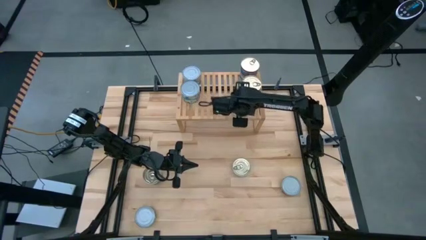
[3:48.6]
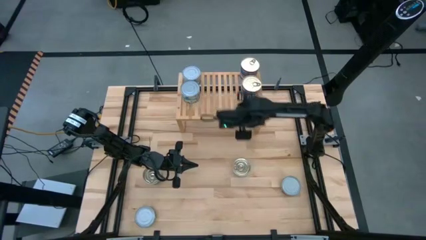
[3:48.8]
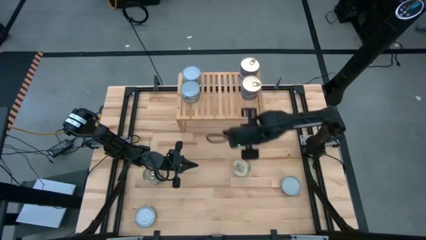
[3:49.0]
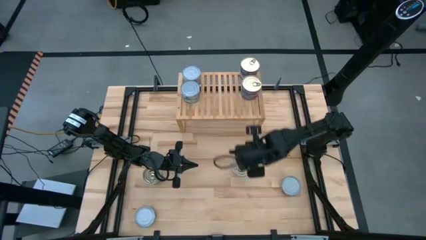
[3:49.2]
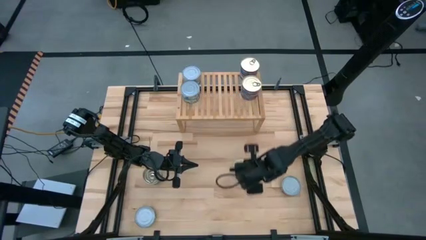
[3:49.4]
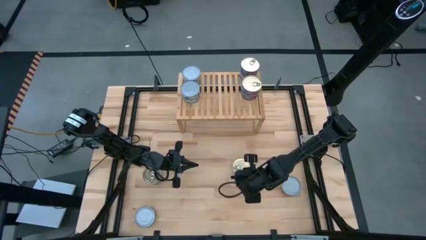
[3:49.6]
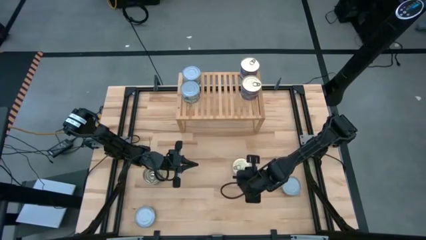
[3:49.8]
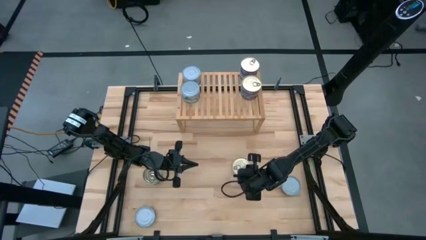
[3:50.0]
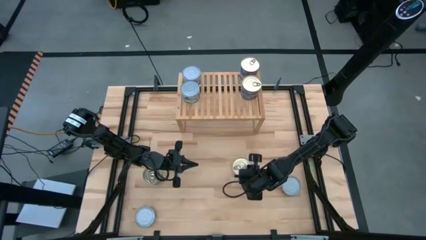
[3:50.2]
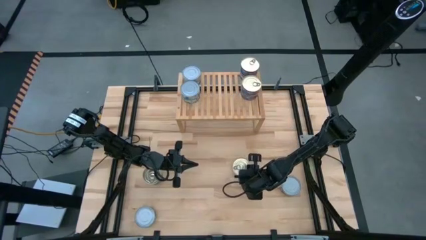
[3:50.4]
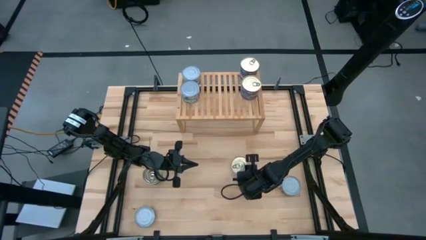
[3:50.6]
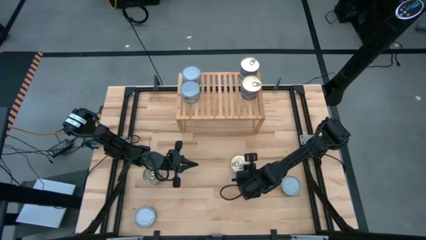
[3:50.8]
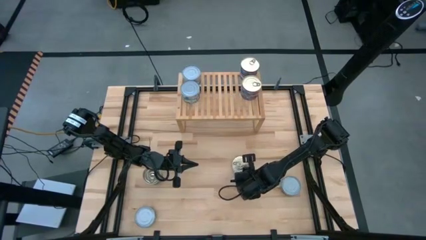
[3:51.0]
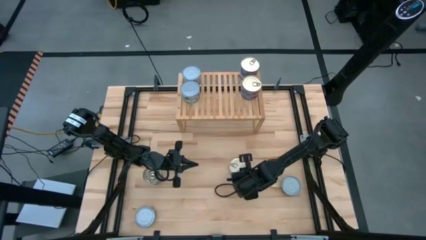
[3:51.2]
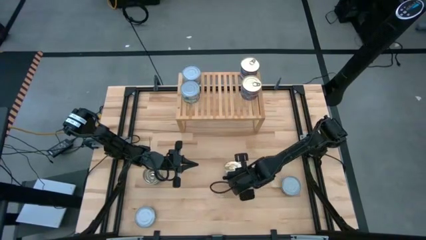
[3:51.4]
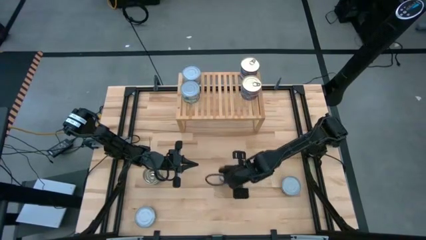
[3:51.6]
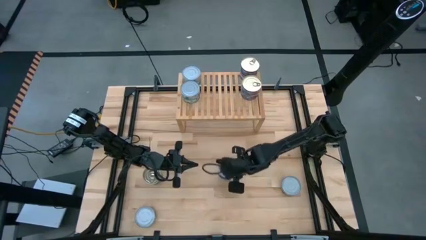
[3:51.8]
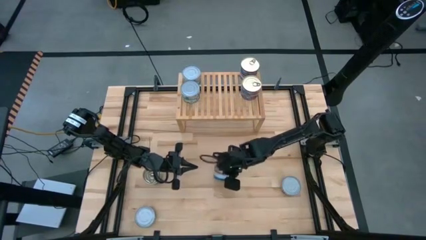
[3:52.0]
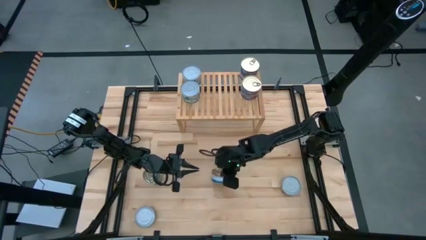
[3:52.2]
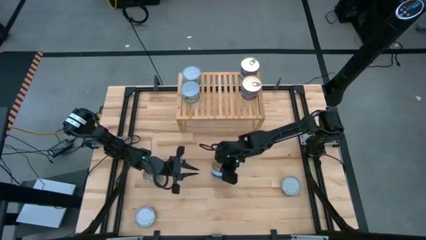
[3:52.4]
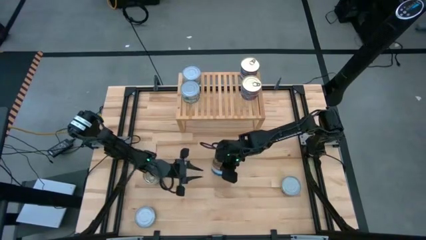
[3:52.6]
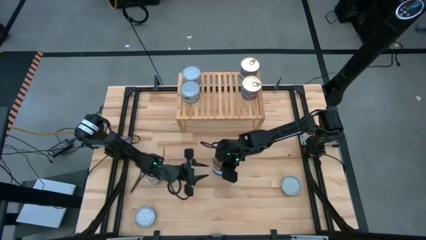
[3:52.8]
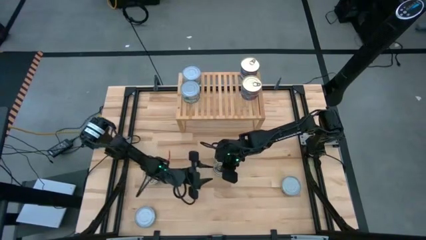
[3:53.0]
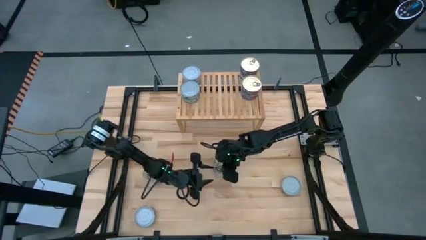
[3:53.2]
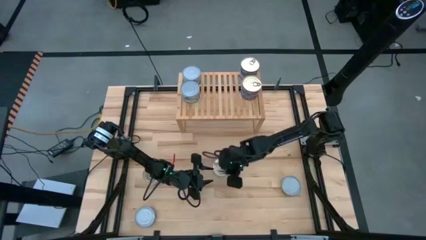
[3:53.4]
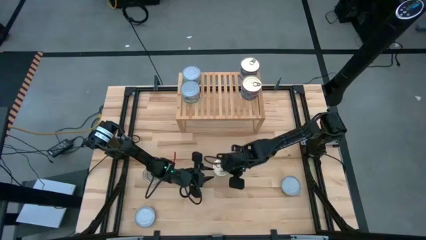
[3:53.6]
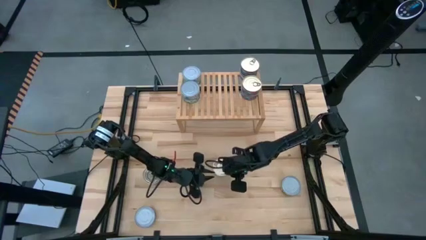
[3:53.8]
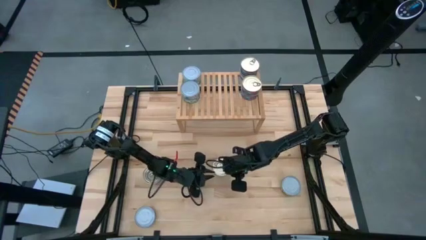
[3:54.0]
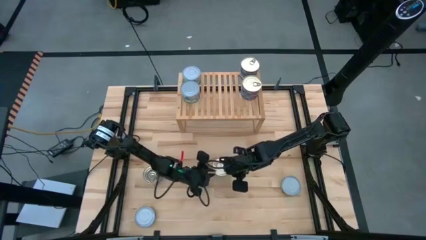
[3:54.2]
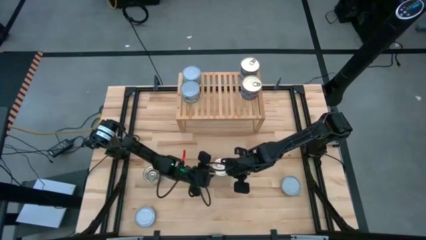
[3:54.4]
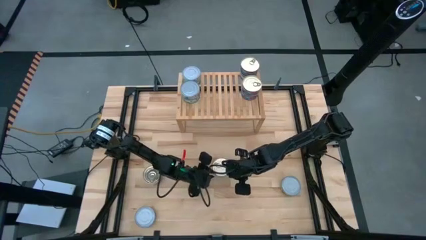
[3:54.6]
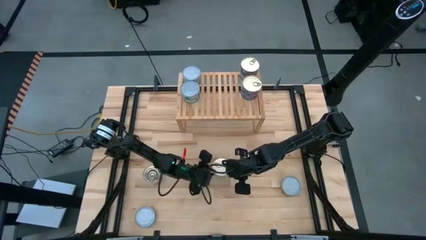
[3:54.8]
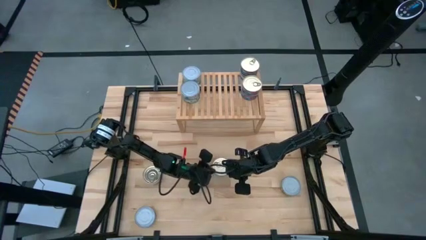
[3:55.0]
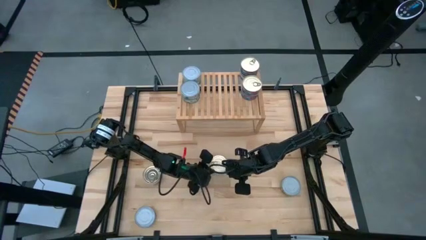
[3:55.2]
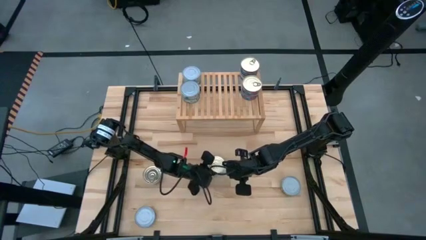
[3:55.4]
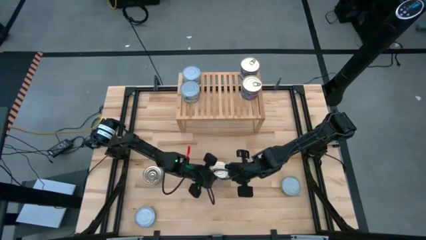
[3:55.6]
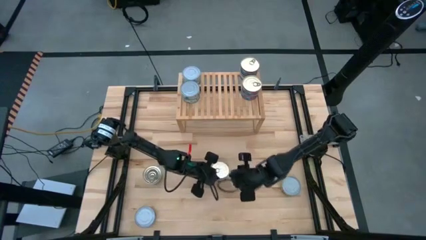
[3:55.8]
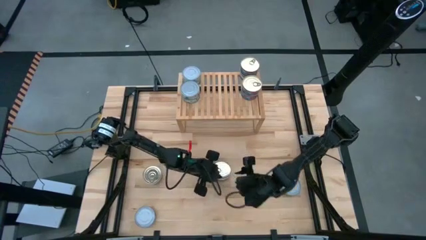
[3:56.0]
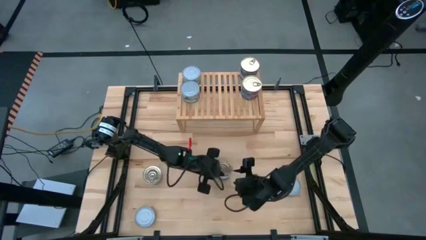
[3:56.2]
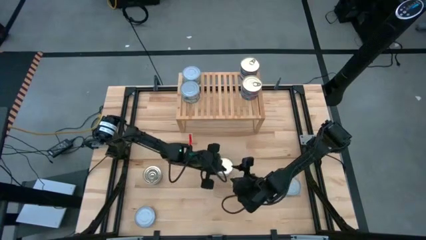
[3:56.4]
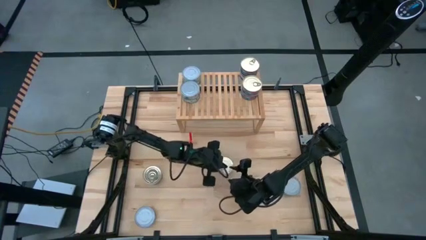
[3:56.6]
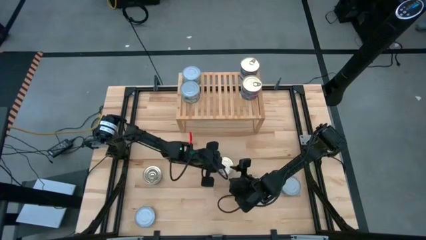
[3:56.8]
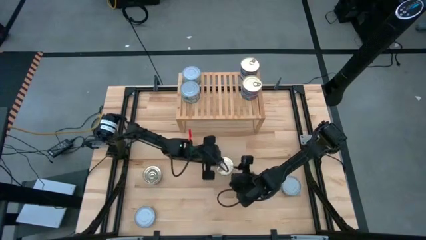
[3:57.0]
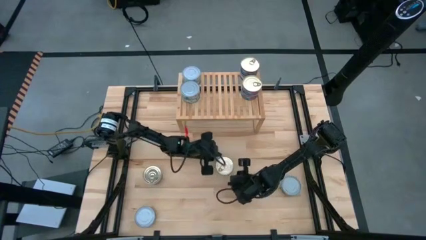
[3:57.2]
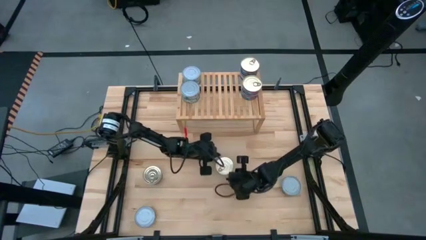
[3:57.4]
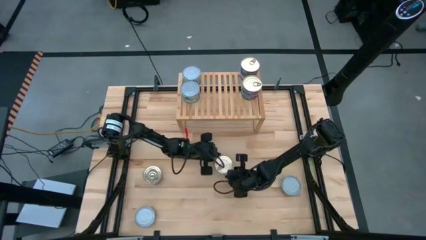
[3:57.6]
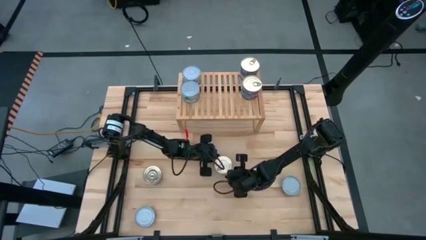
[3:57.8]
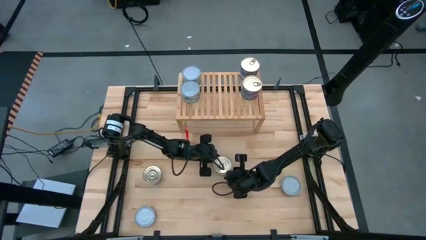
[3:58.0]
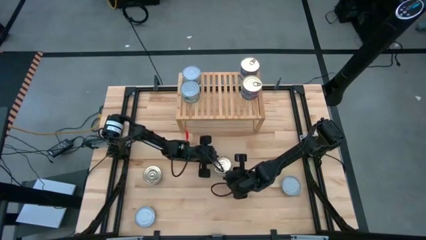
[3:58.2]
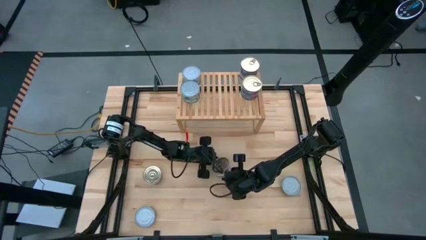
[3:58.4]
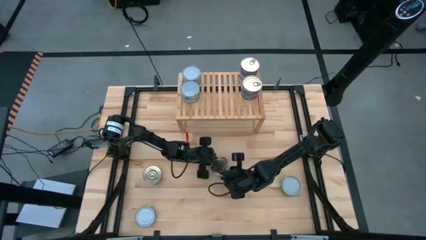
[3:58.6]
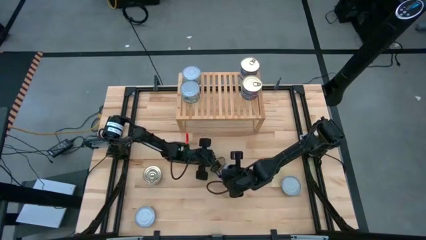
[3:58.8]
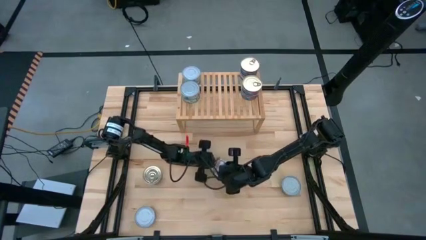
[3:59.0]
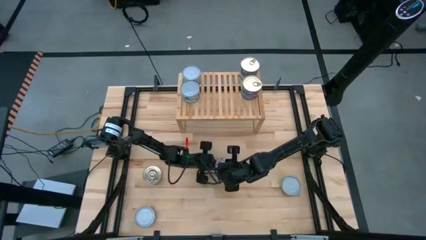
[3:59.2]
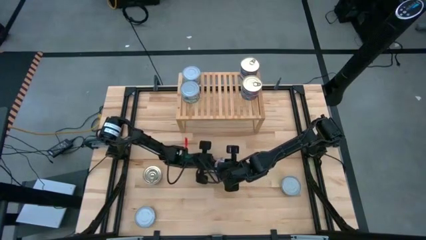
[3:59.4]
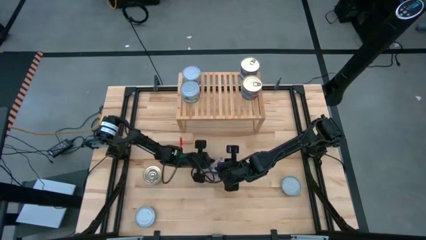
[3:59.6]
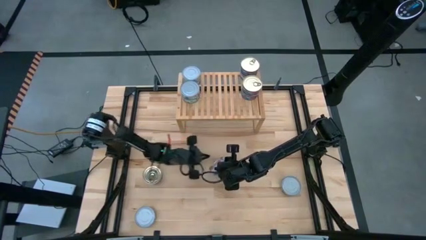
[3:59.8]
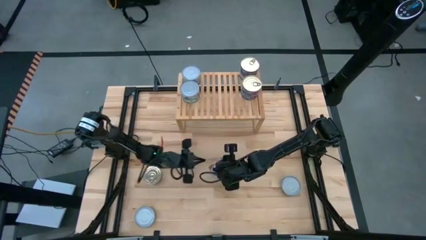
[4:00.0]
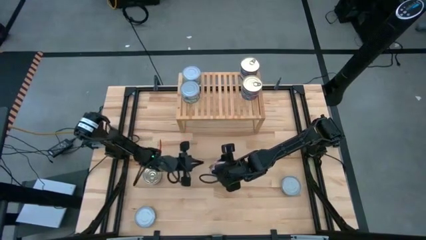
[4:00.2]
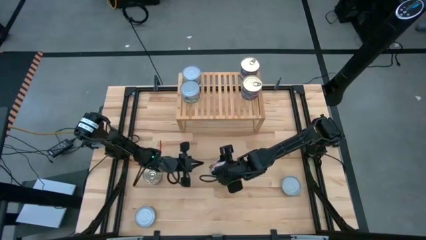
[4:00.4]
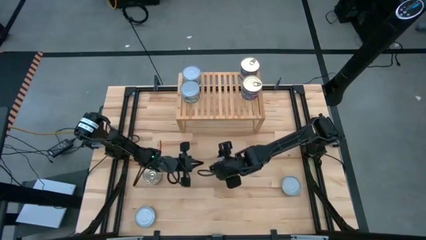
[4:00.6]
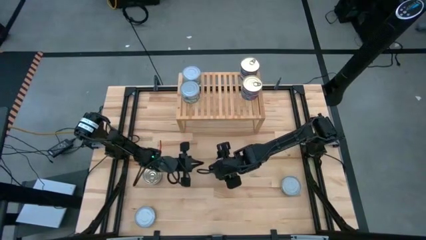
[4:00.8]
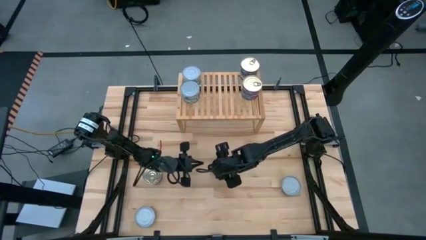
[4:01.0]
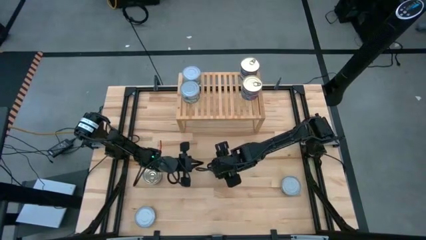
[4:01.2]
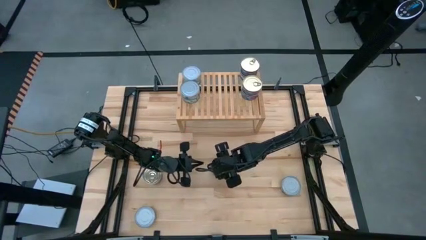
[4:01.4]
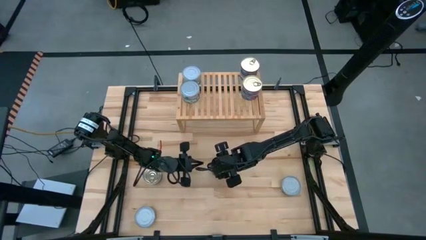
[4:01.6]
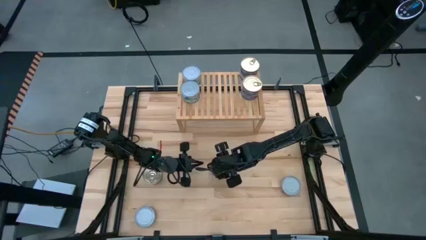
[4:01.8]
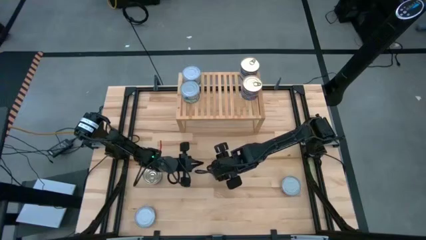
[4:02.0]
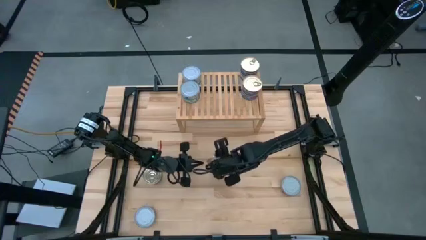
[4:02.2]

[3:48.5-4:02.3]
Task: Stack canned seafood by type on shelf
Put the blue tuna can on the shelf

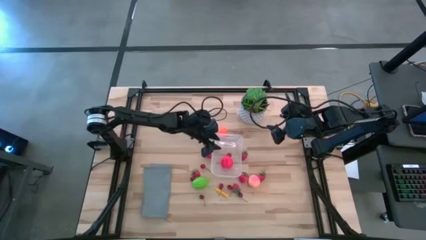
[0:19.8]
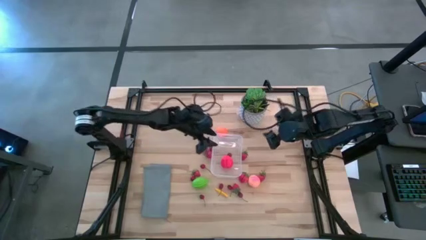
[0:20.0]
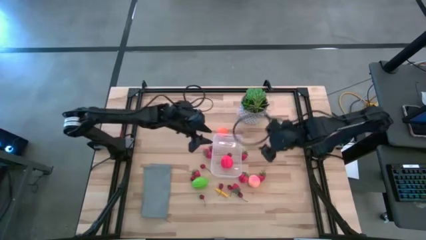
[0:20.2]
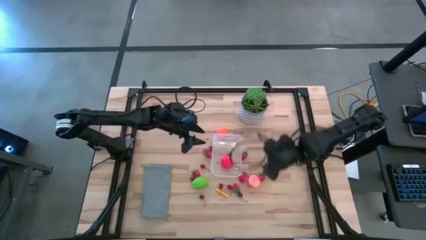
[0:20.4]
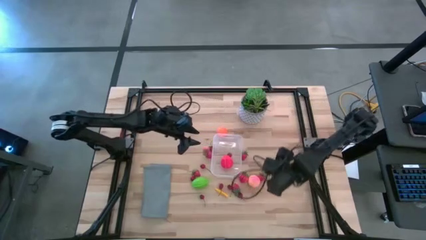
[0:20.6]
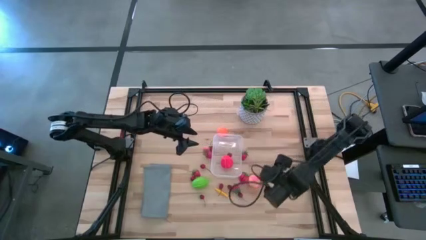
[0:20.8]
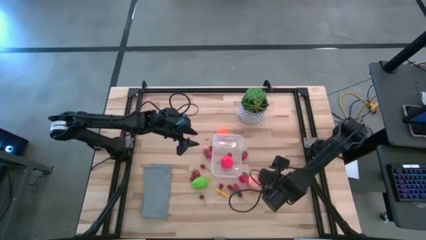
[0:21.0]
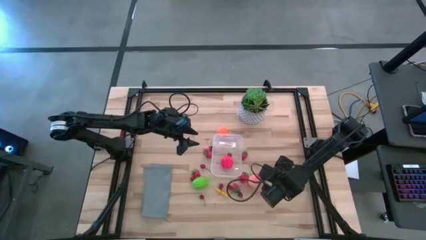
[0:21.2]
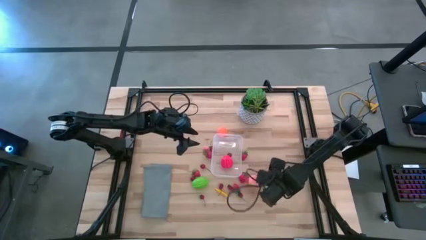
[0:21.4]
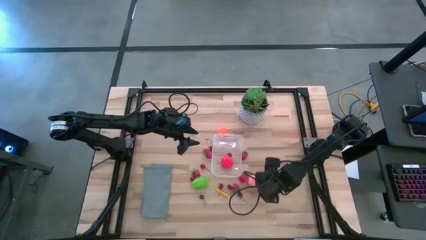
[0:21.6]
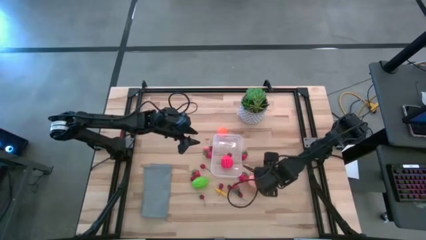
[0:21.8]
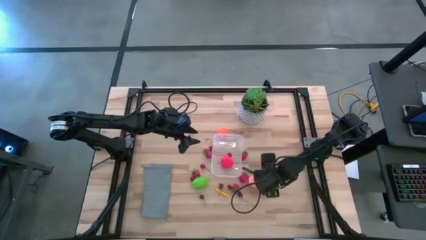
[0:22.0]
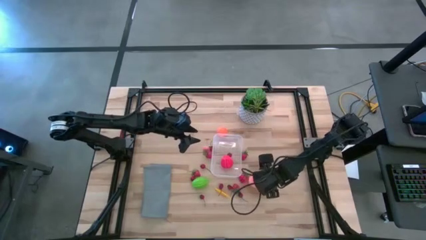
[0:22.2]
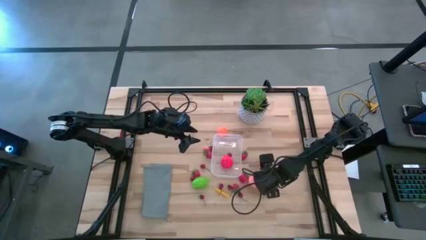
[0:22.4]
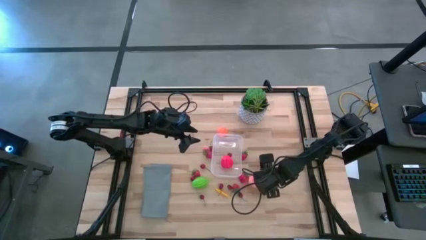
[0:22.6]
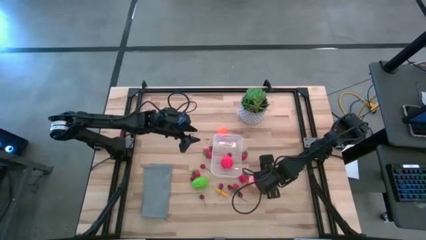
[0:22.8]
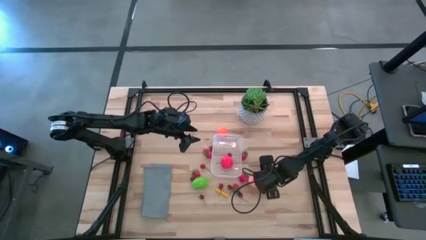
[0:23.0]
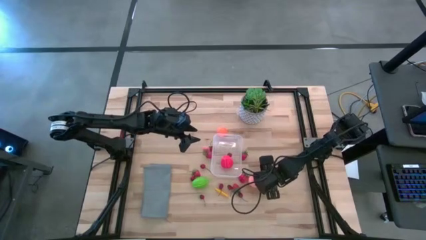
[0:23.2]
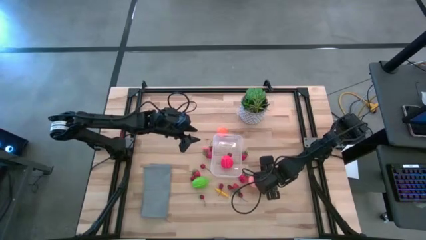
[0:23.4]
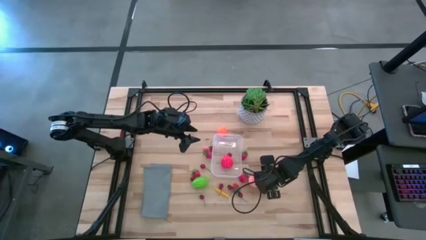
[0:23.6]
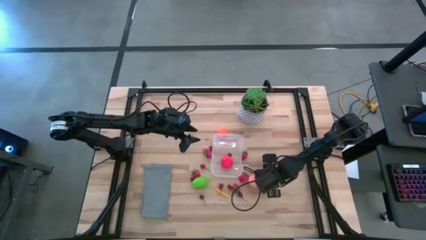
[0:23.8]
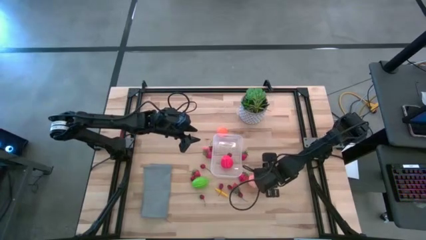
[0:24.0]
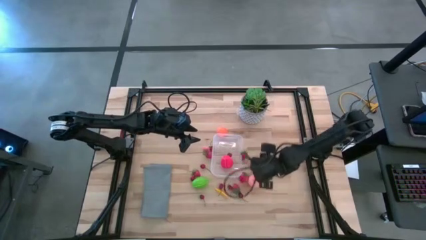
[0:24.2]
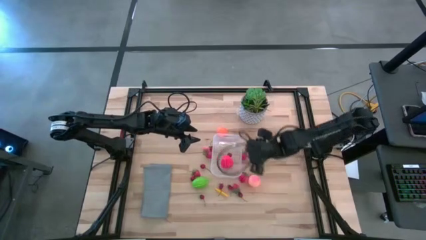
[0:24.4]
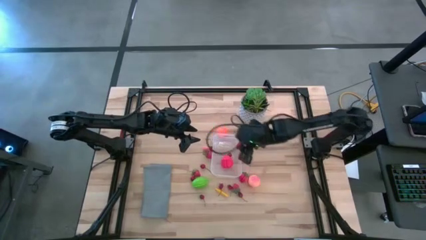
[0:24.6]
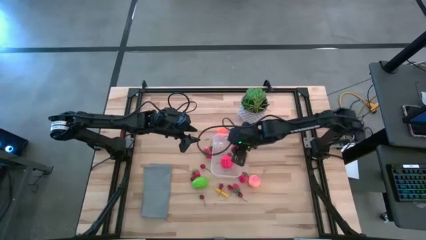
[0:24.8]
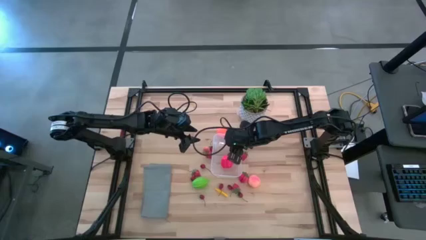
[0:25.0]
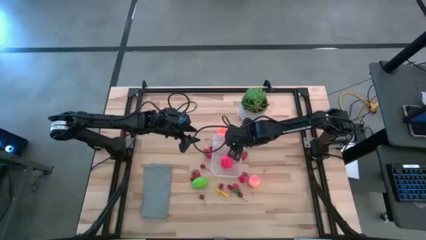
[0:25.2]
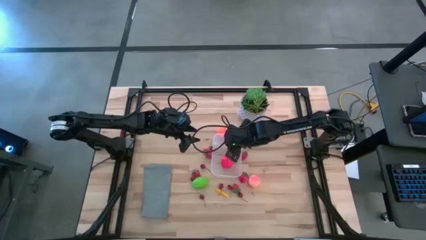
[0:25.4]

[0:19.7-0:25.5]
Task: Pick and placing Produce into tupperware
Put the red strawberry into the transparent bin
